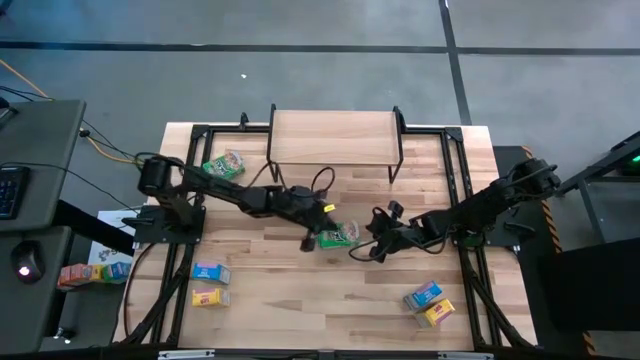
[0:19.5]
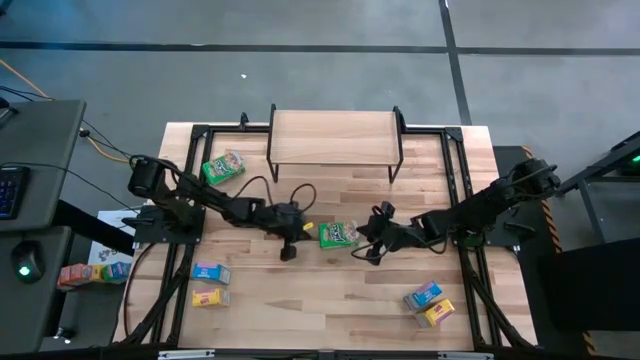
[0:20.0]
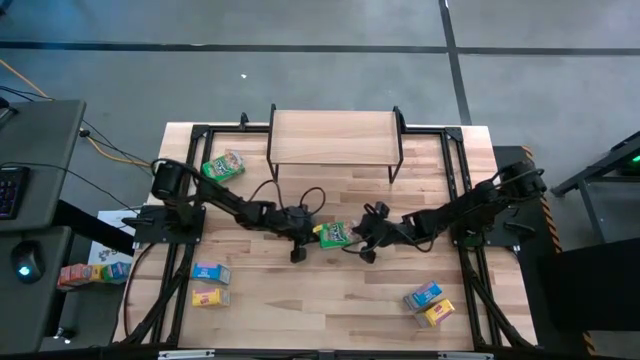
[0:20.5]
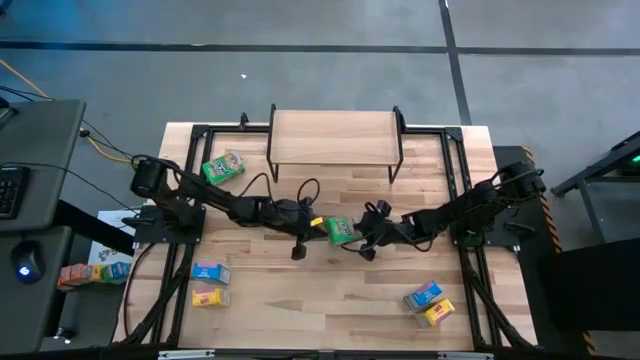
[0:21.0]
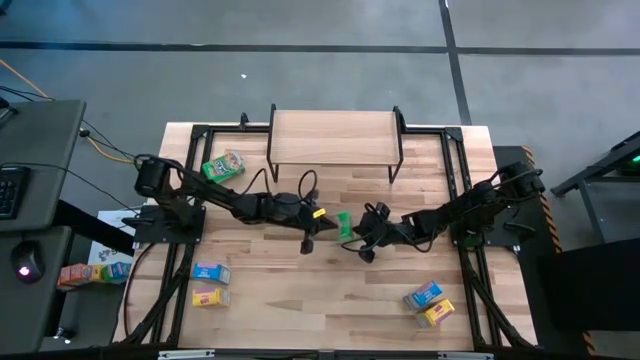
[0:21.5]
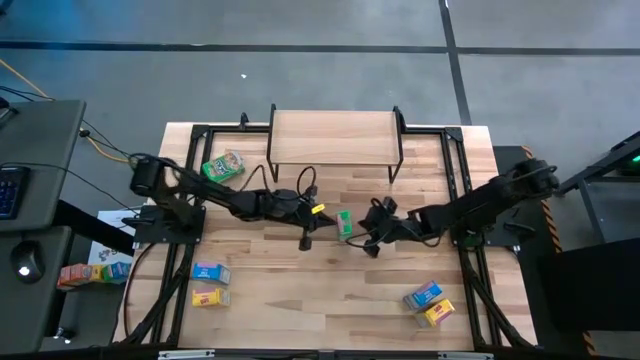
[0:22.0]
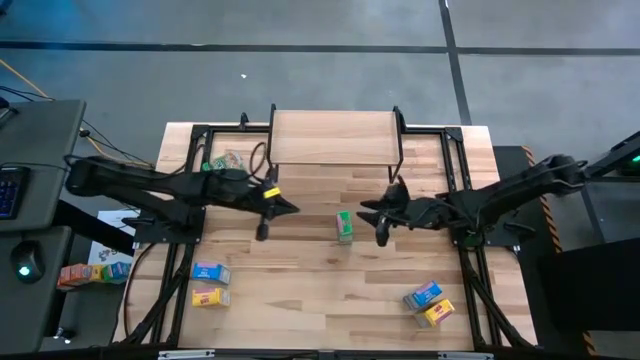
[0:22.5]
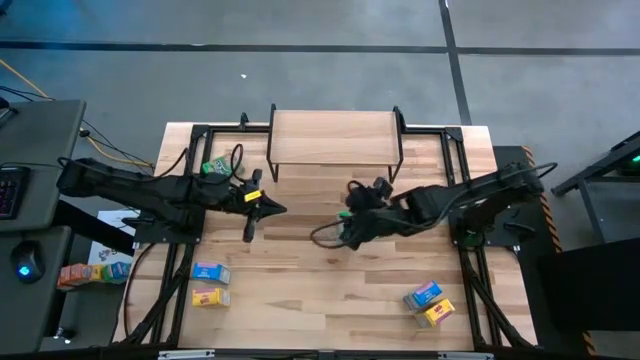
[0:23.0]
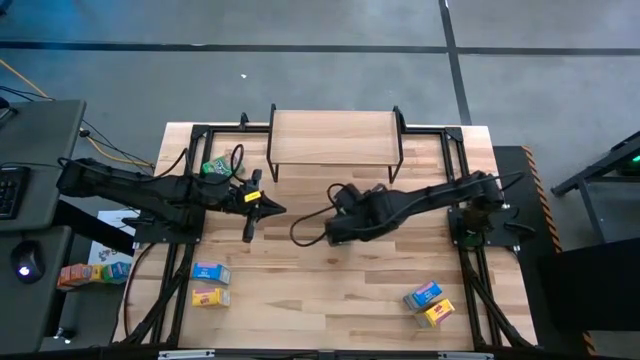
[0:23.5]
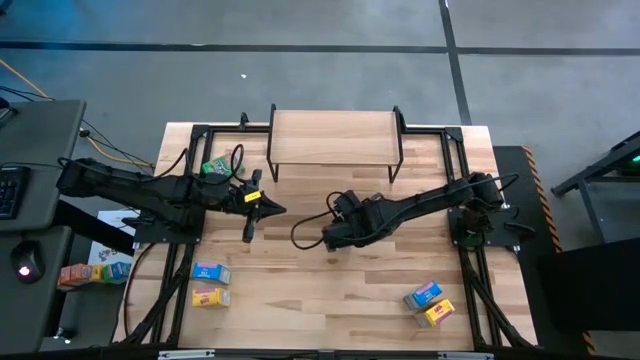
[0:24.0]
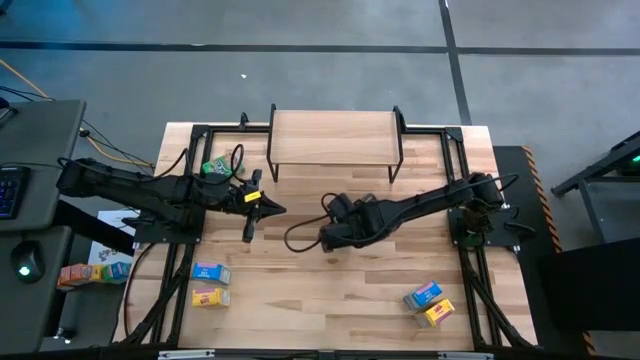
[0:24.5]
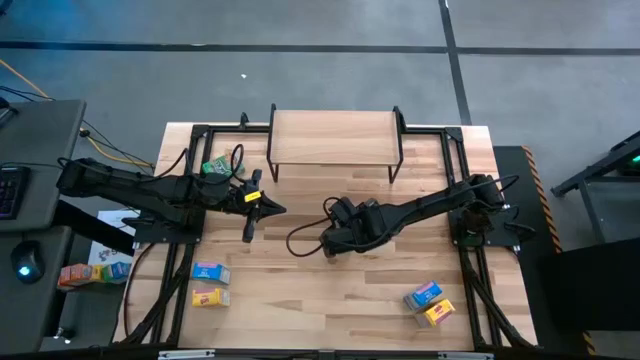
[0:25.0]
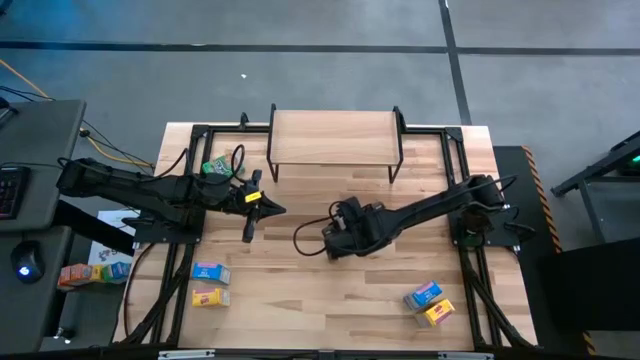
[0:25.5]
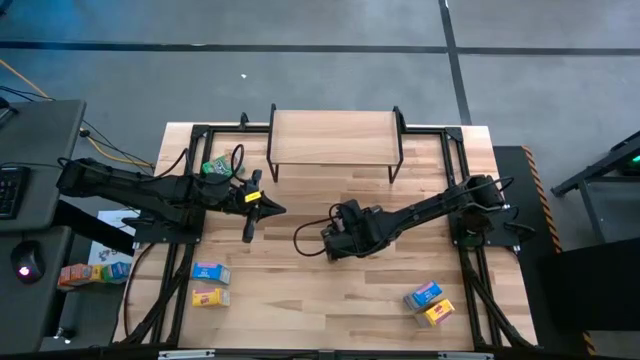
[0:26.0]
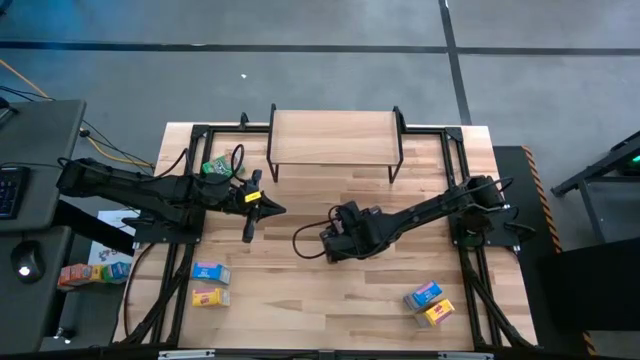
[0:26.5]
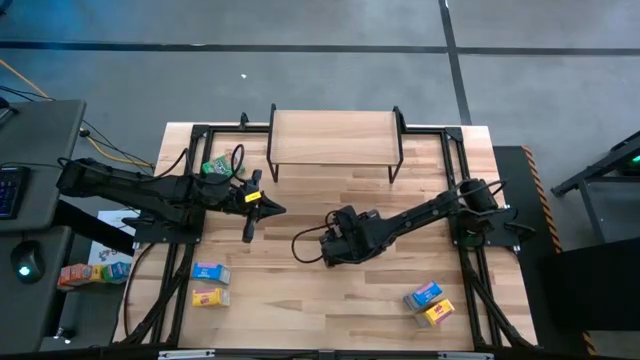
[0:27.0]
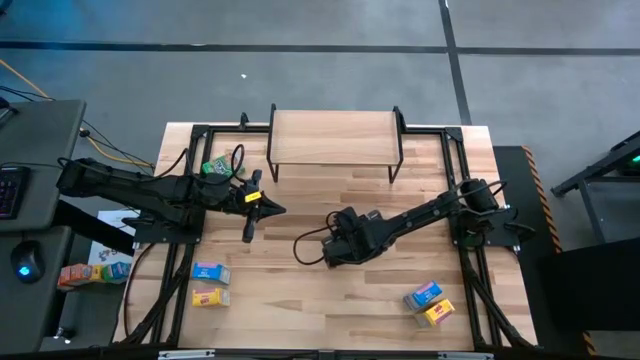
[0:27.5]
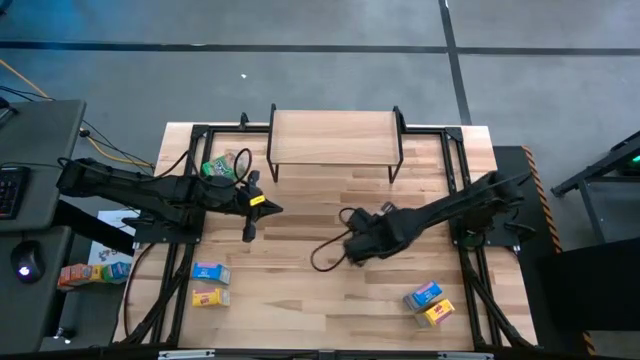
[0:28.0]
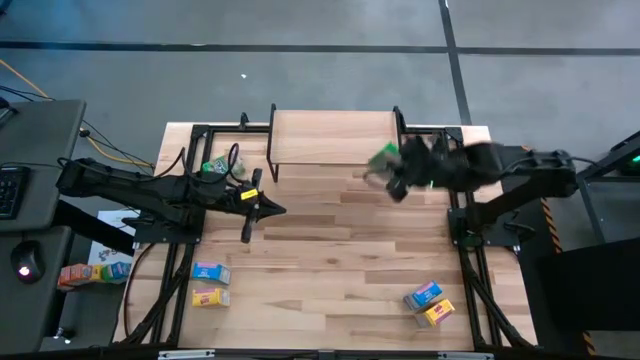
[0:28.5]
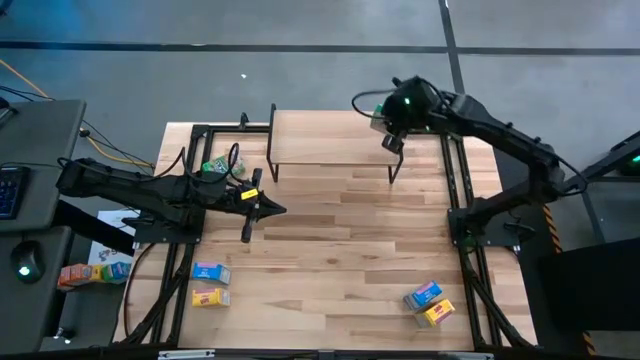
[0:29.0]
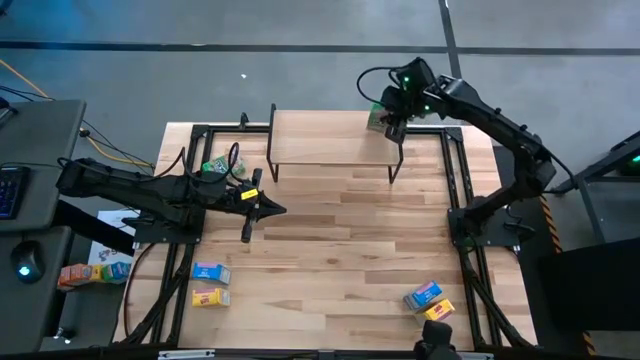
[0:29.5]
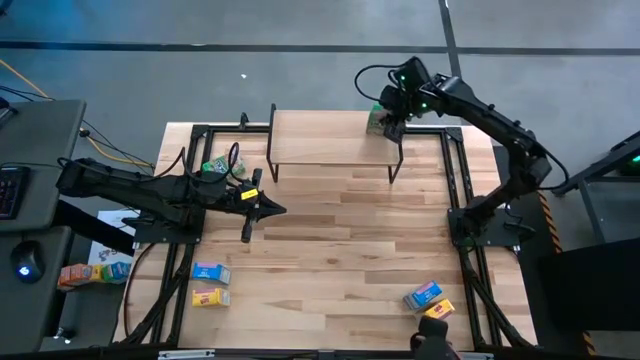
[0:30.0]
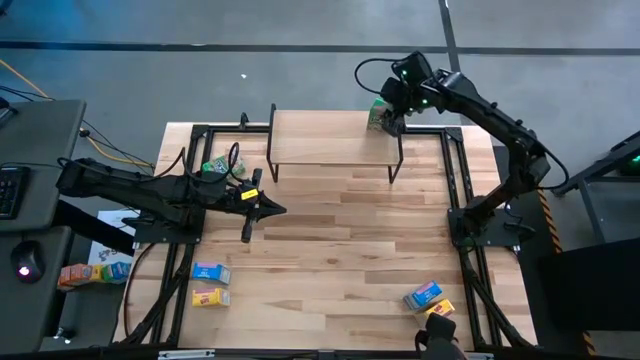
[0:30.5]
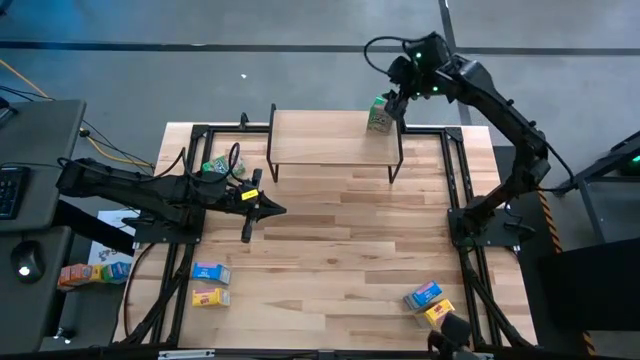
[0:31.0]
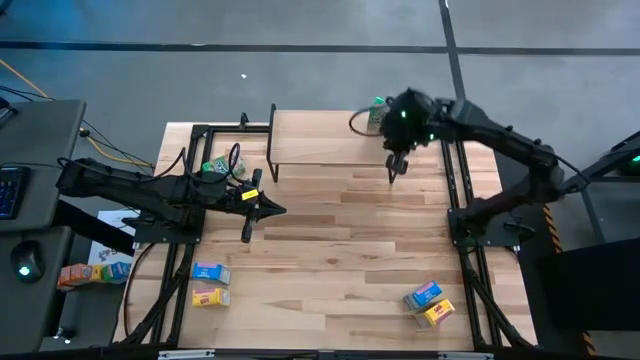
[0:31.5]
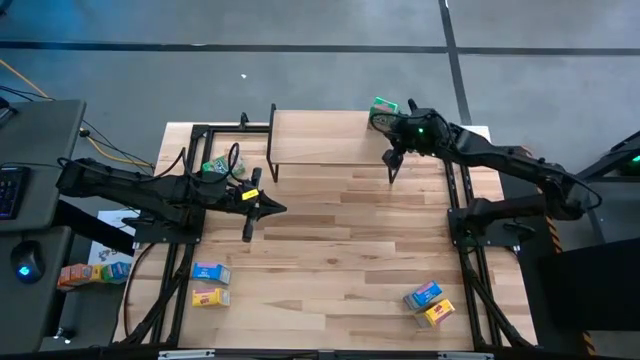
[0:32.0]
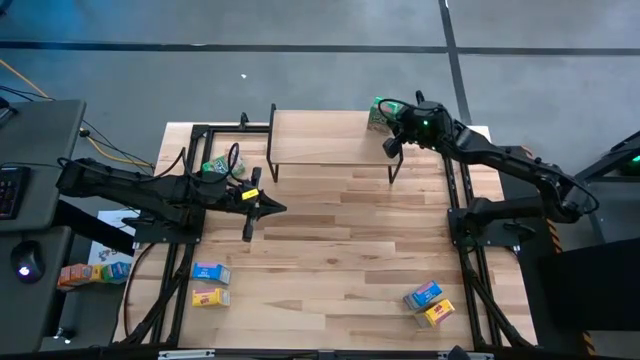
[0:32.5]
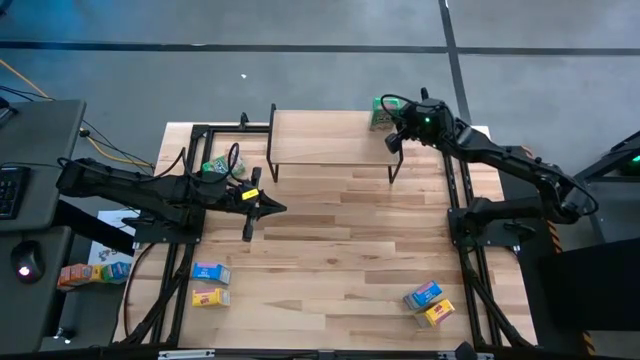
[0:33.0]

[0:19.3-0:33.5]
Task: Stack cereal on shelf
Put the right green cereal box on the shelf

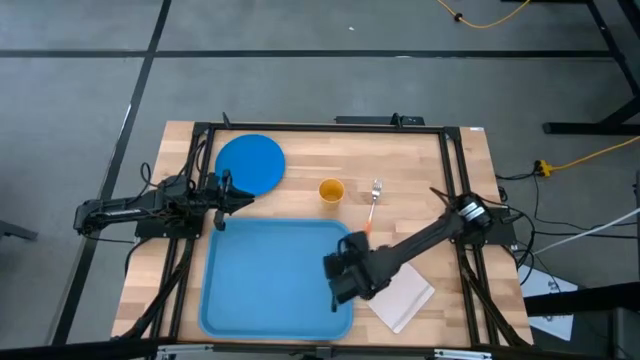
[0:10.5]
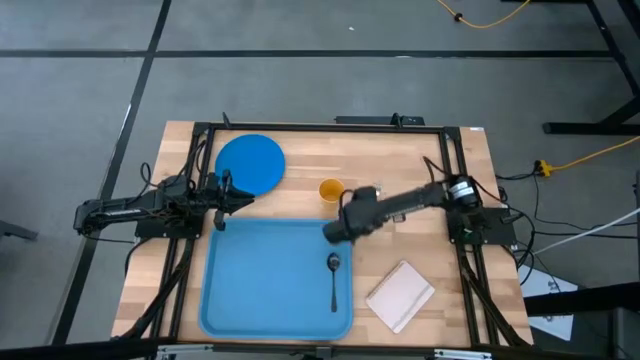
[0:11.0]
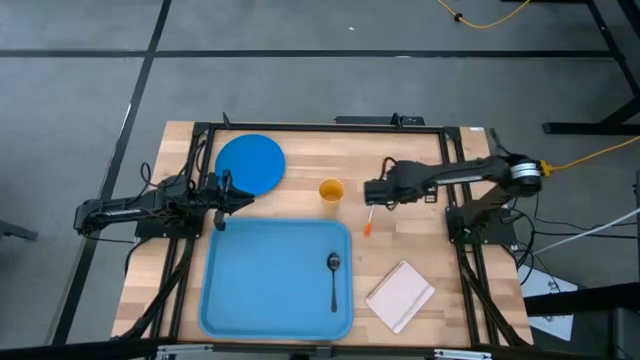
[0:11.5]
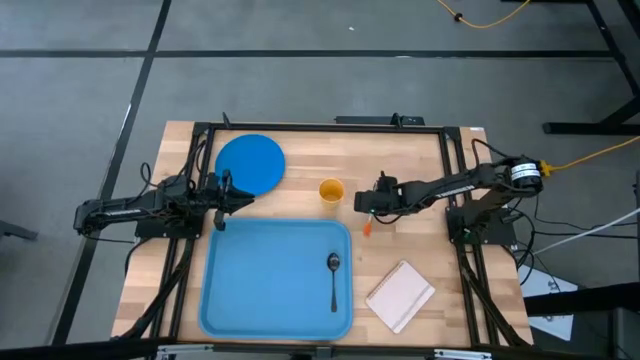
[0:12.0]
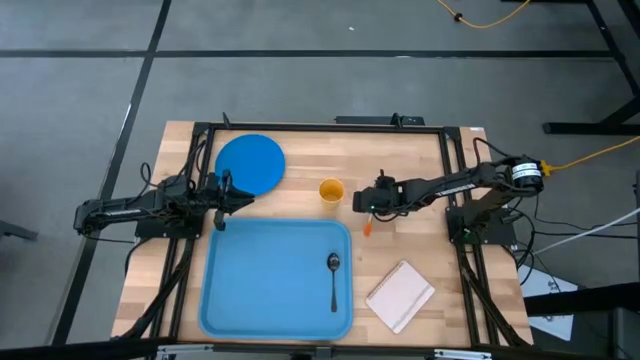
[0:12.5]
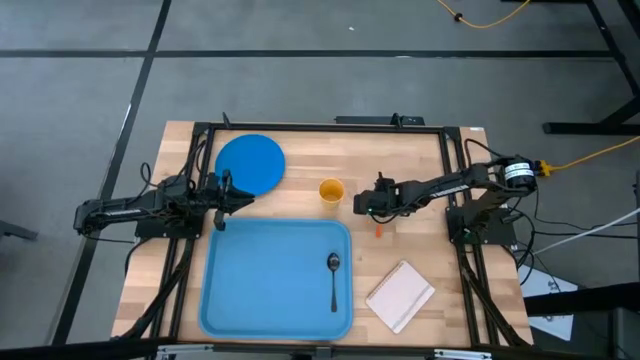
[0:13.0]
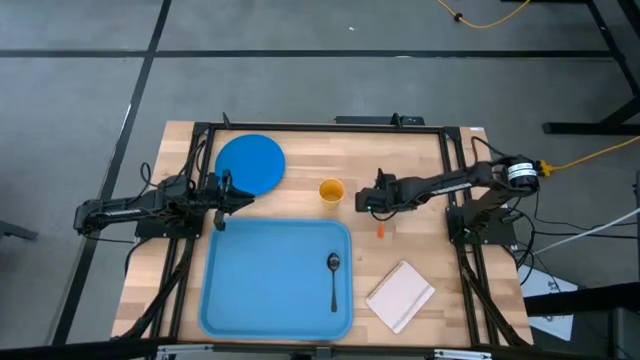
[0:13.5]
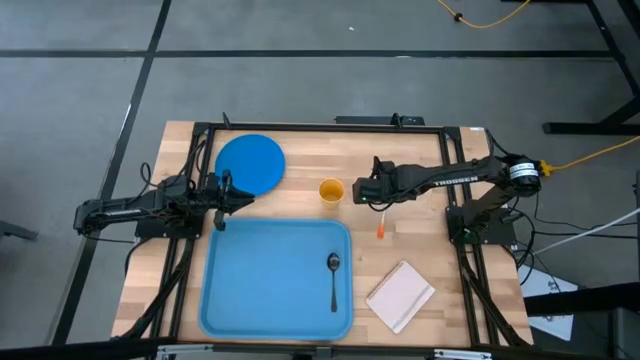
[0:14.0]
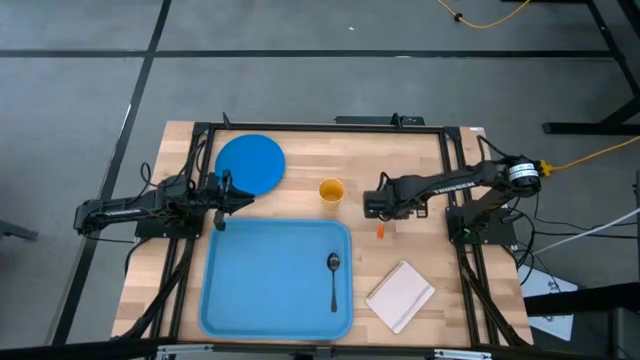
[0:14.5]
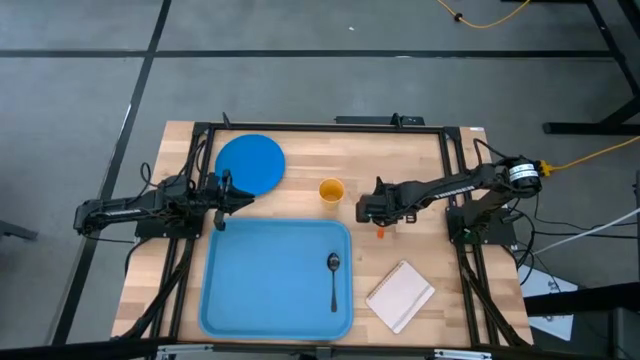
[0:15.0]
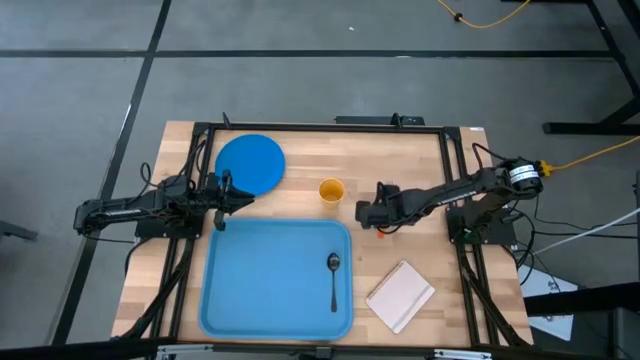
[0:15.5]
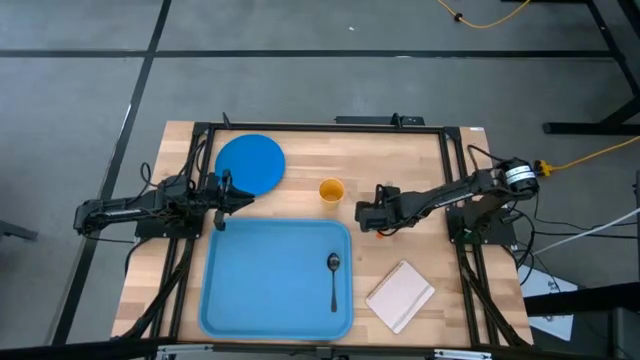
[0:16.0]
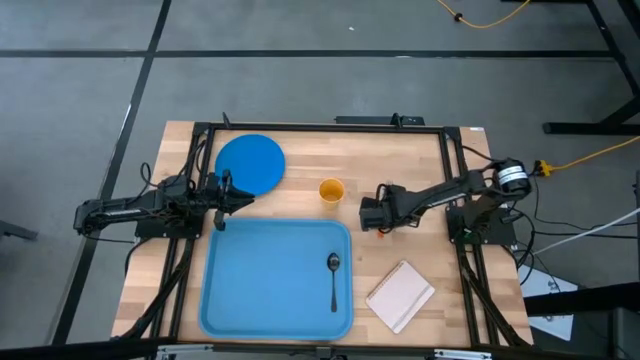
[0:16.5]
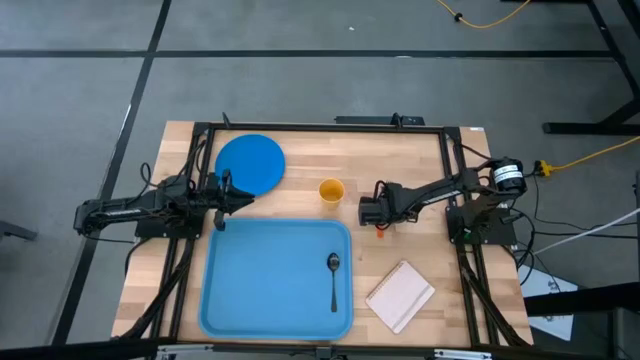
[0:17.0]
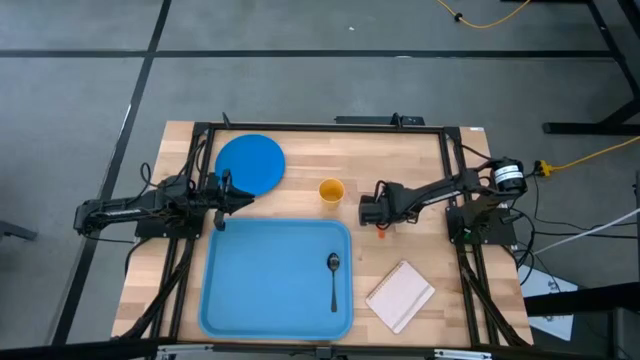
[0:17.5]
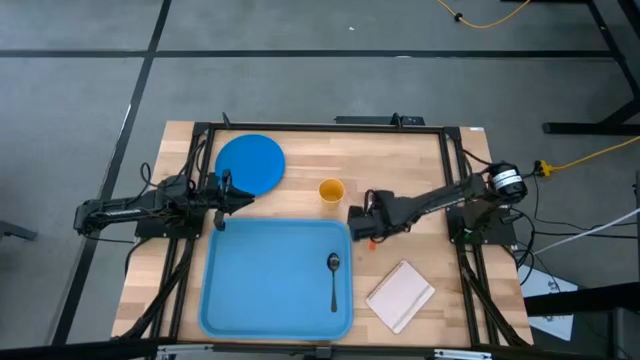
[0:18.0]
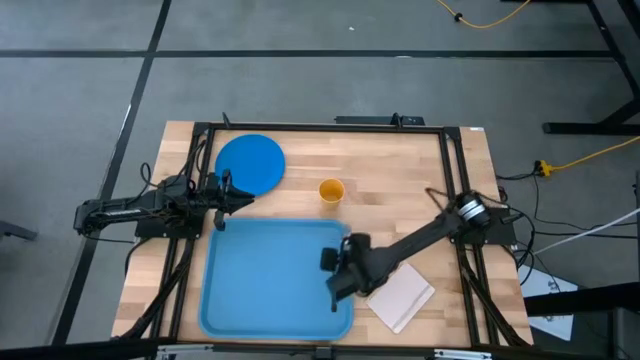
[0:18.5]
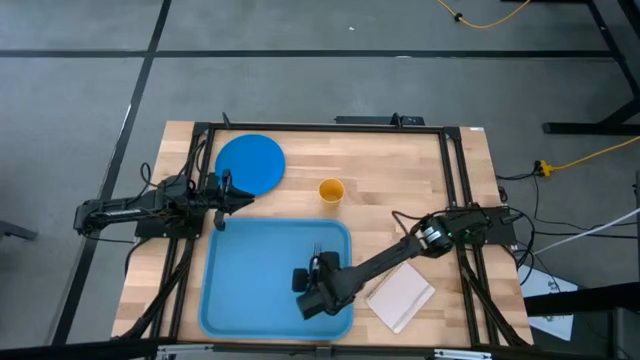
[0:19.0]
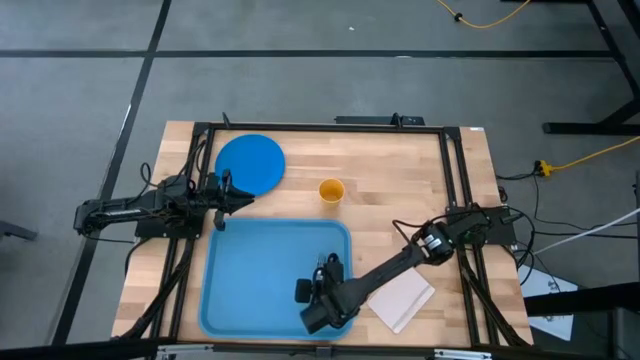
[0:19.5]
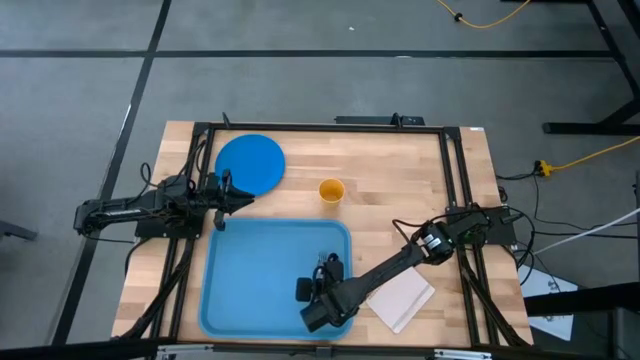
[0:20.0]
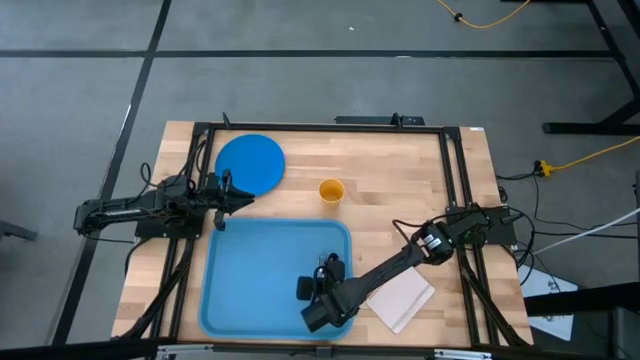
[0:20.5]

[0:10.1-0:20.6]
Task: Pick and place plate/cup/fork/spoon on tray
Put the orange fork on the blue tray
